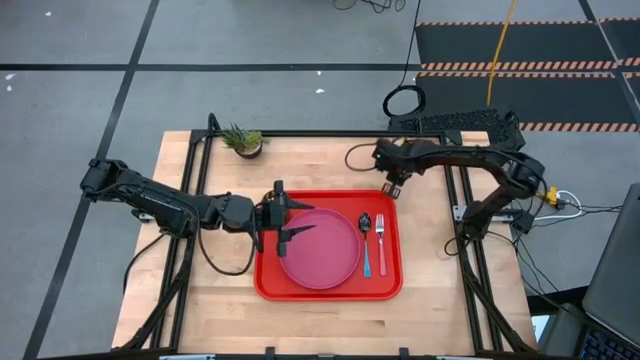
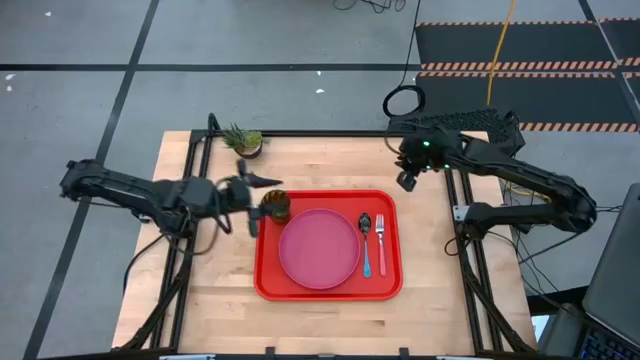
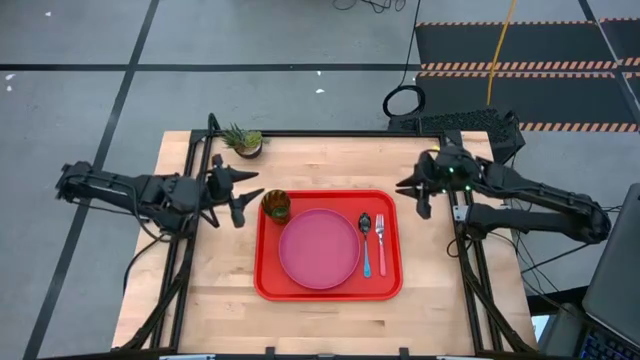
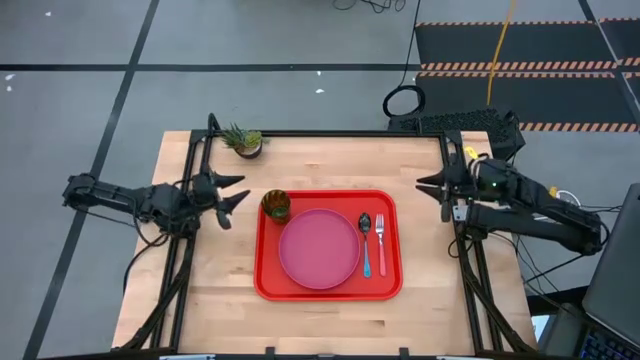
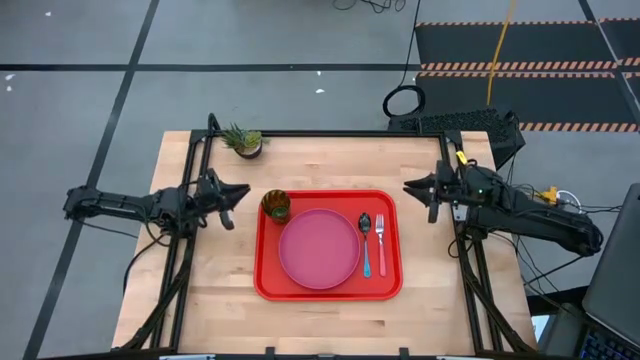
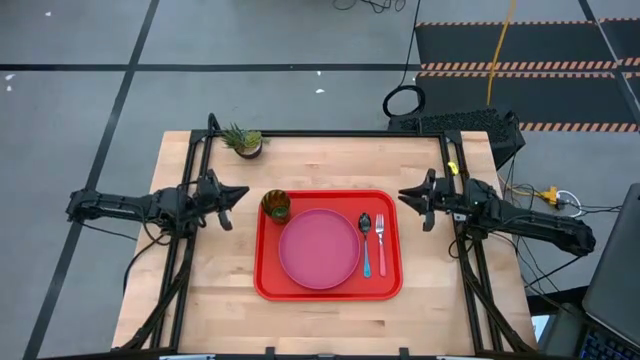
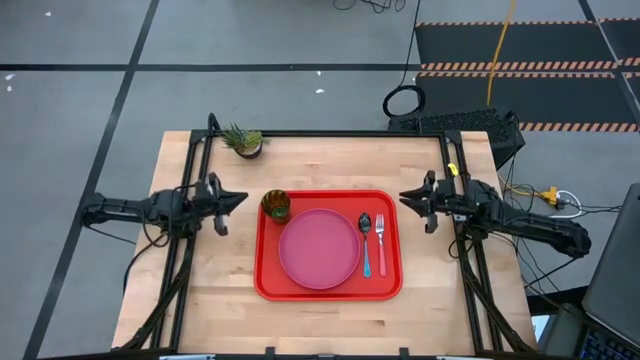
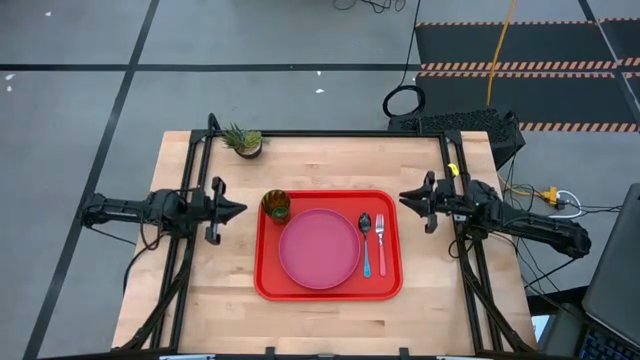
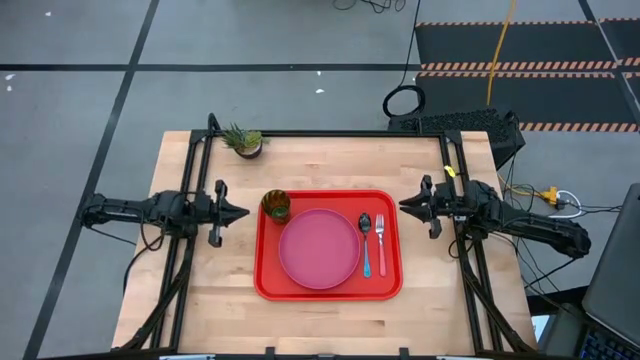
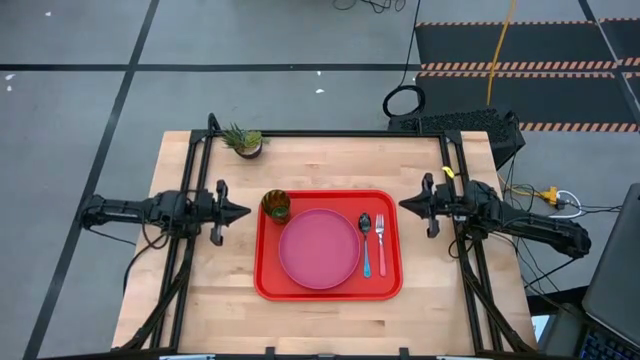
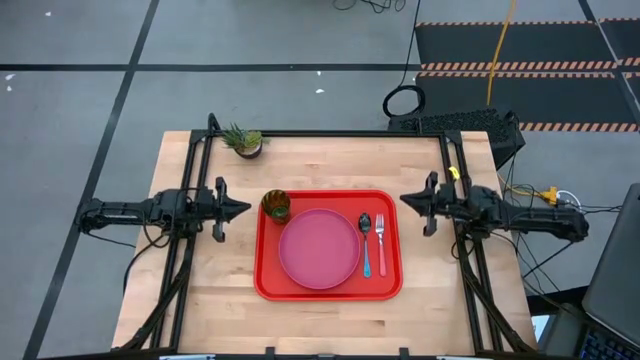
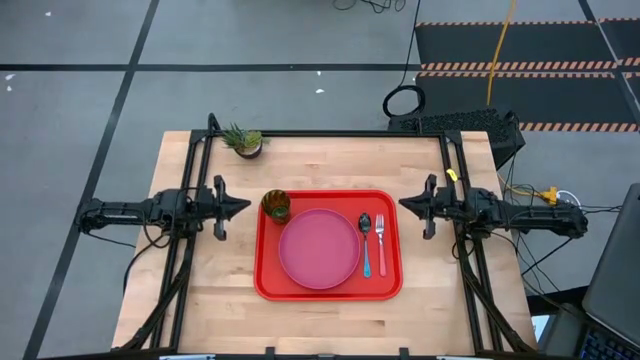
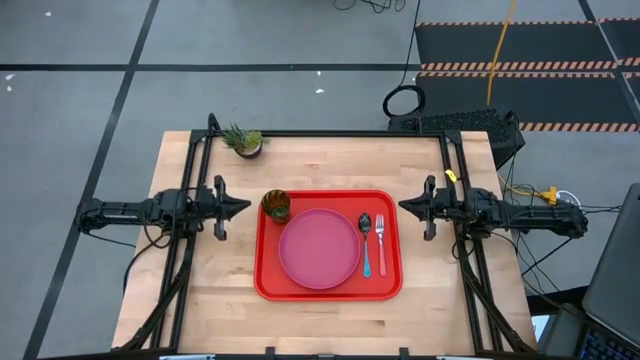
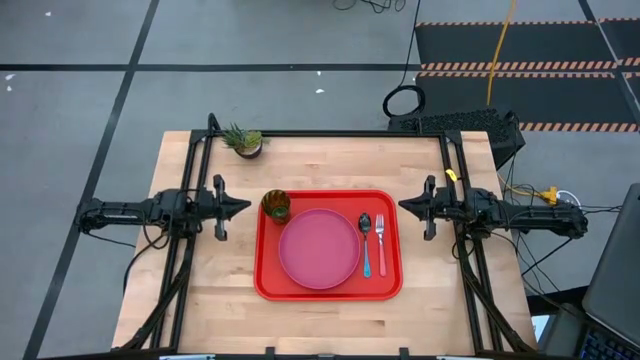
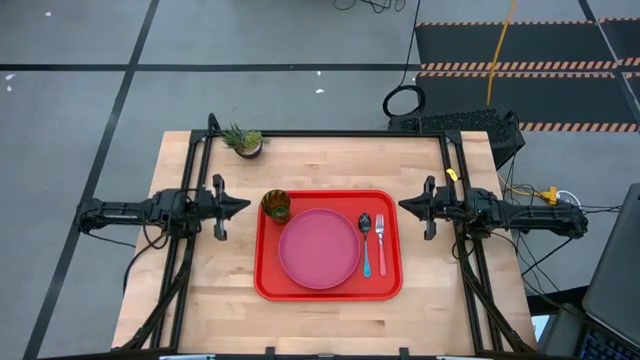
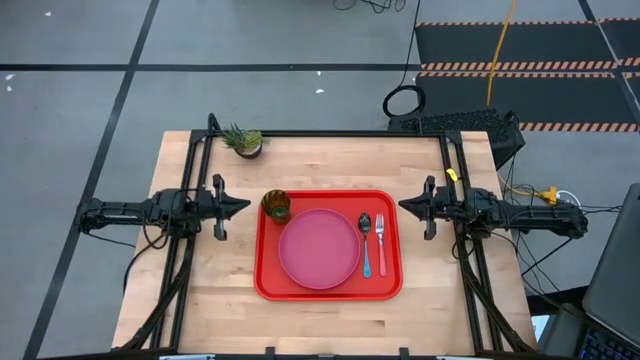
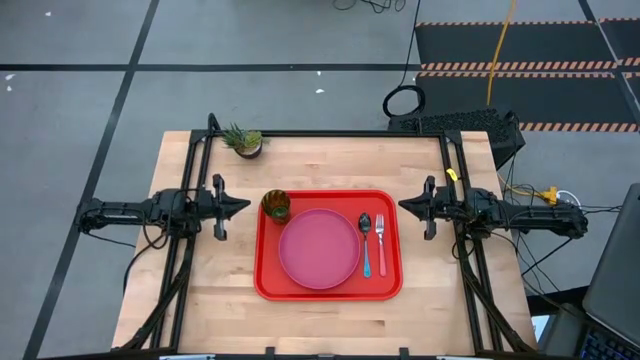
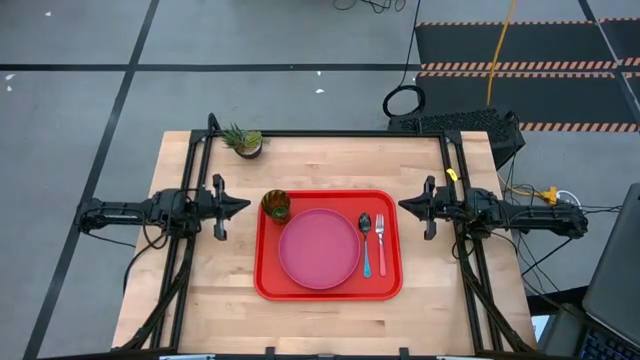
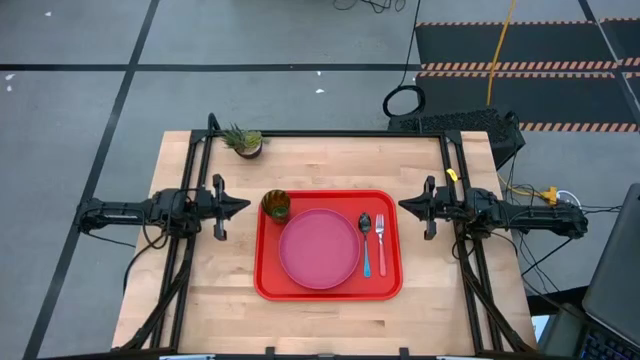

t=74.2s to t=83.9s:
Task: Pick and place plate/cup/fork/spoon on tray
Return to Home Position

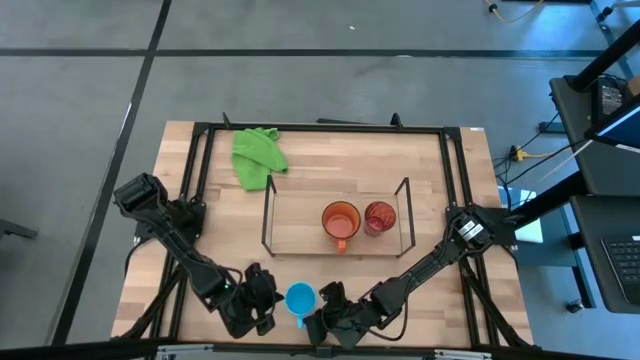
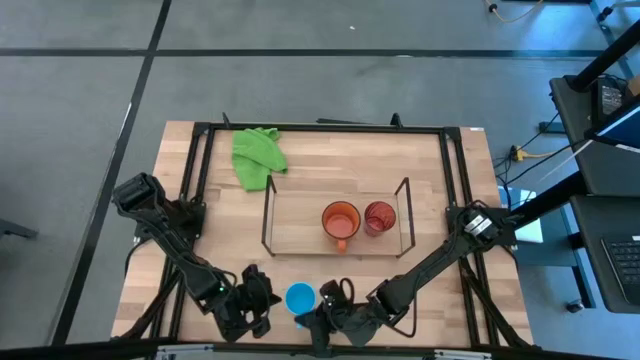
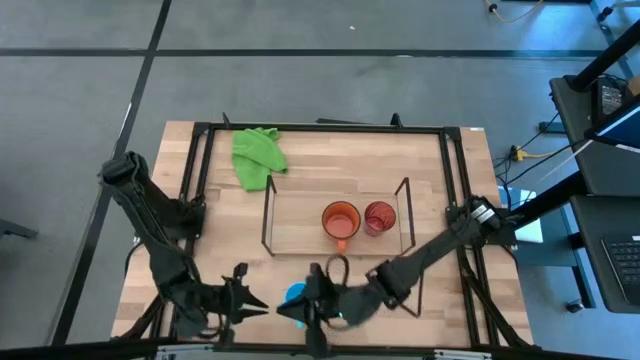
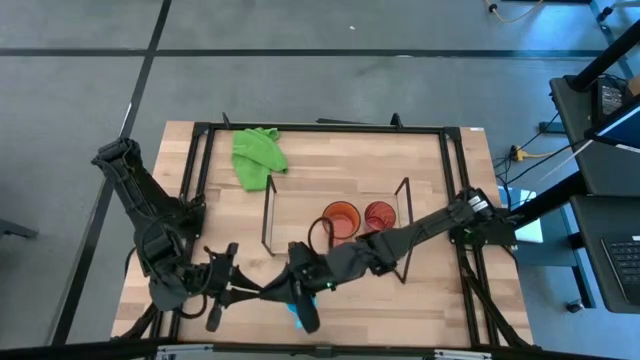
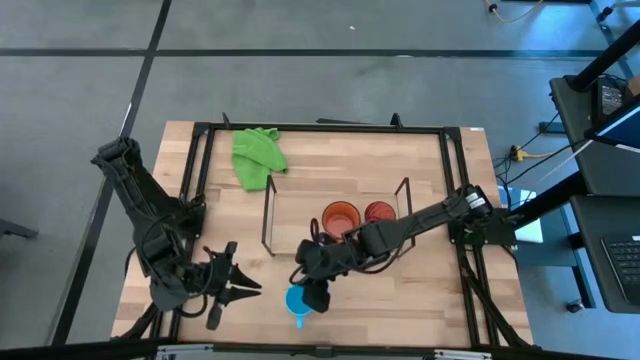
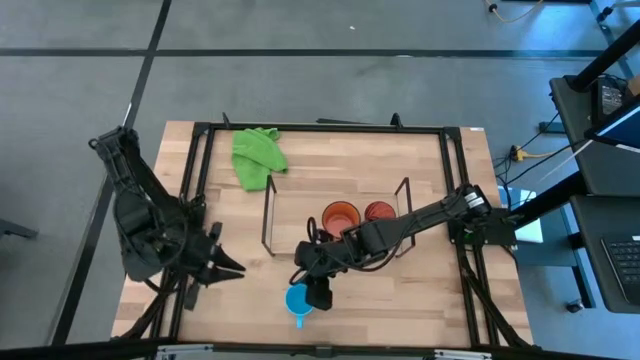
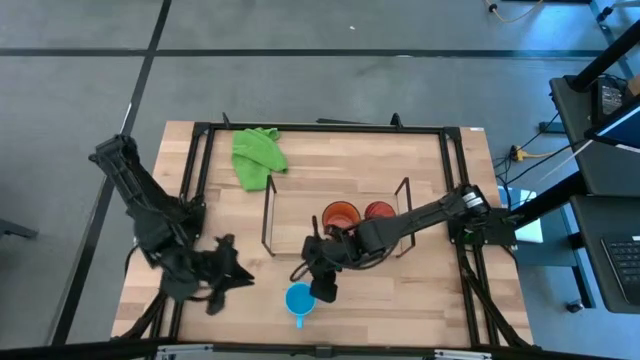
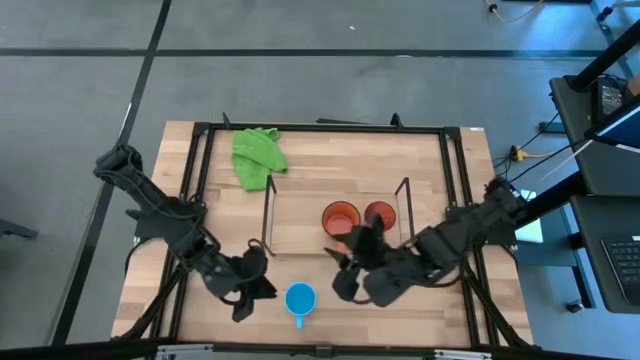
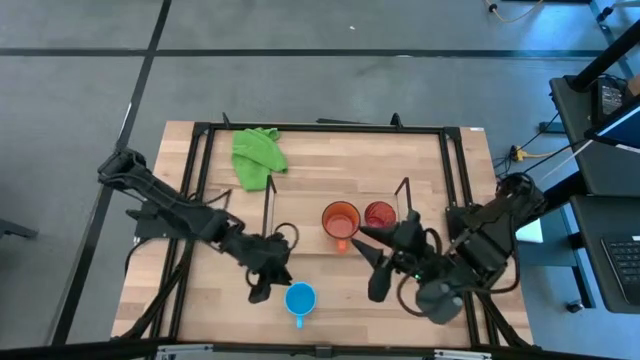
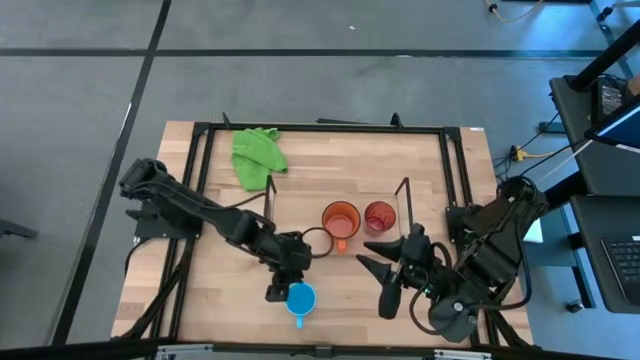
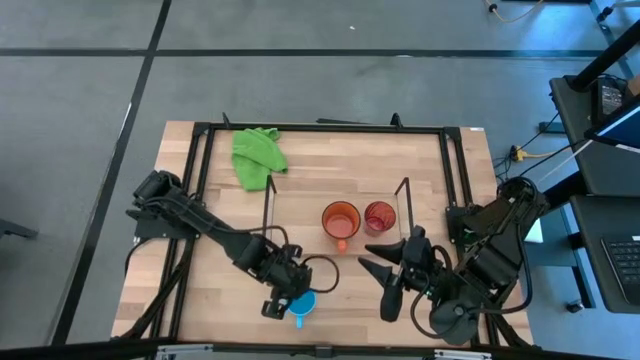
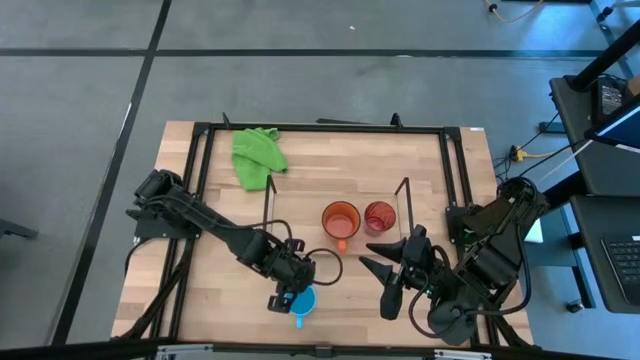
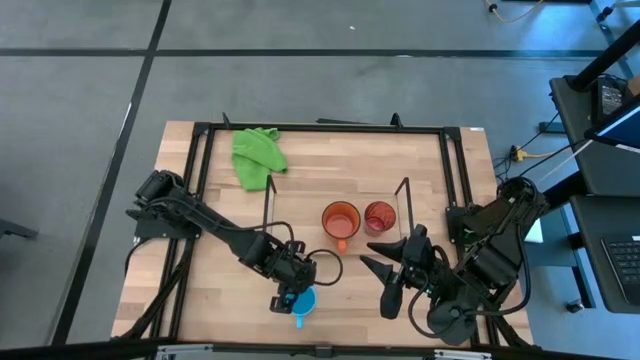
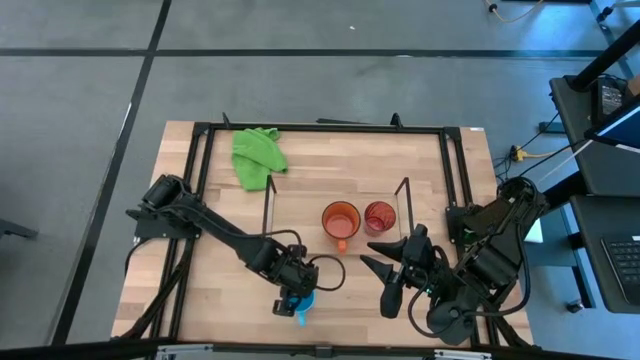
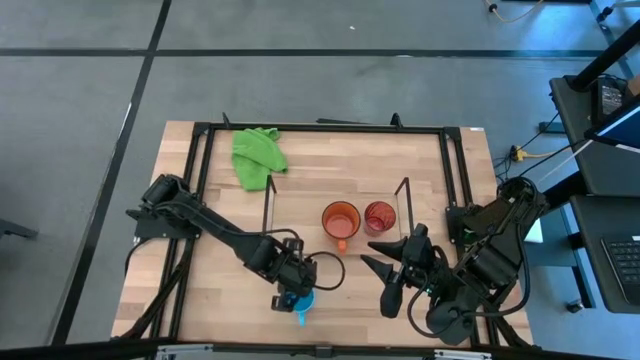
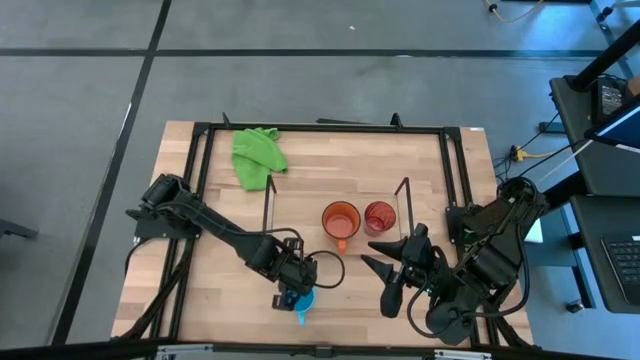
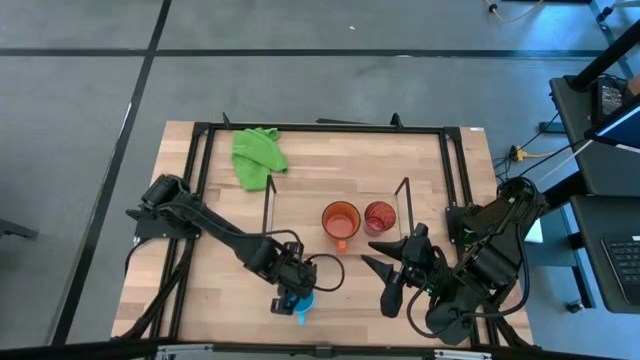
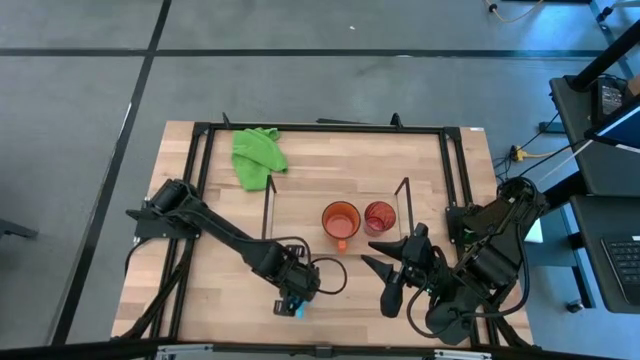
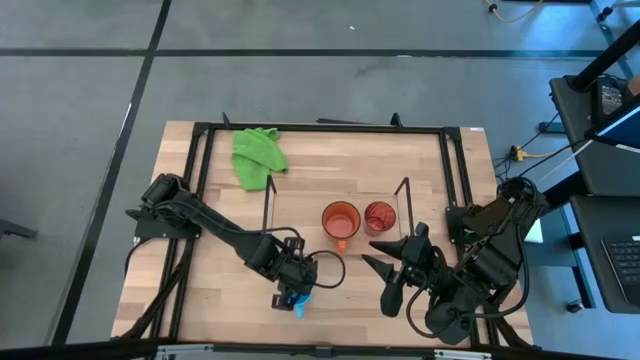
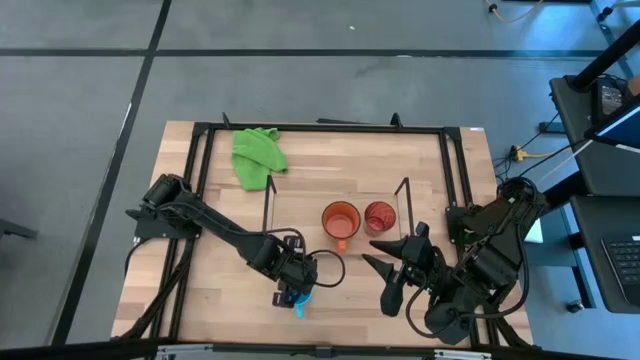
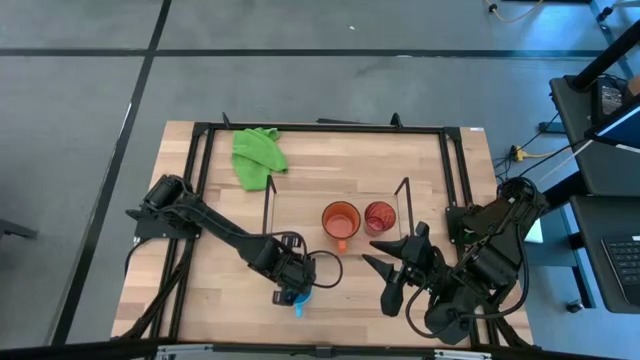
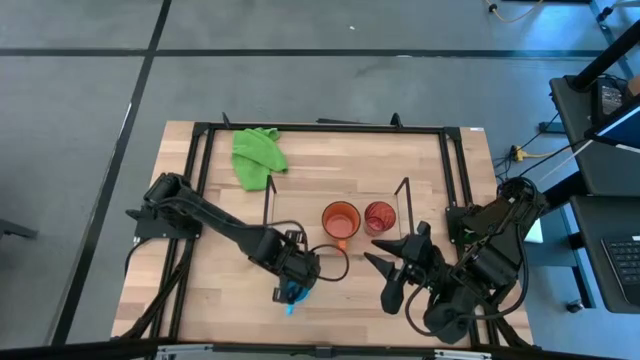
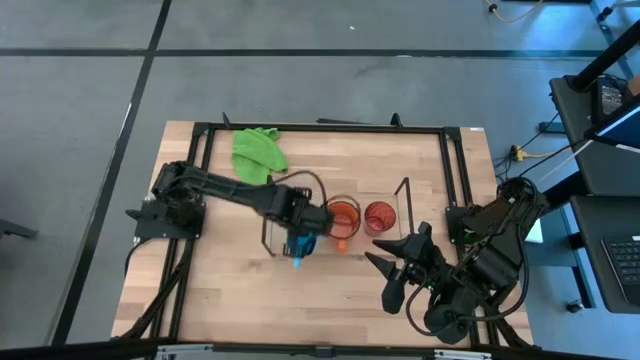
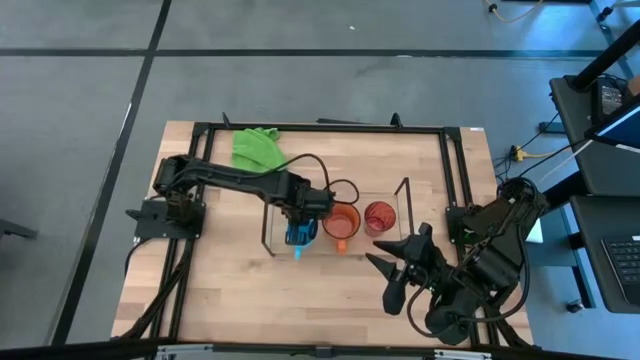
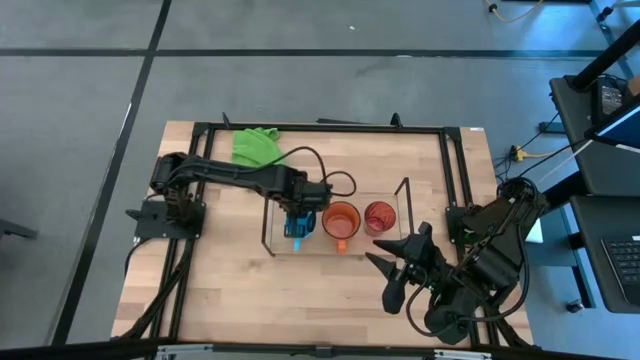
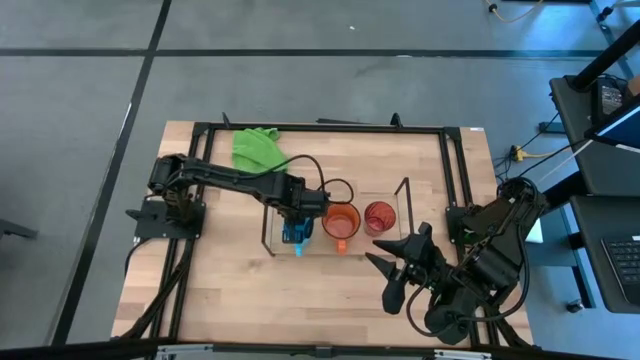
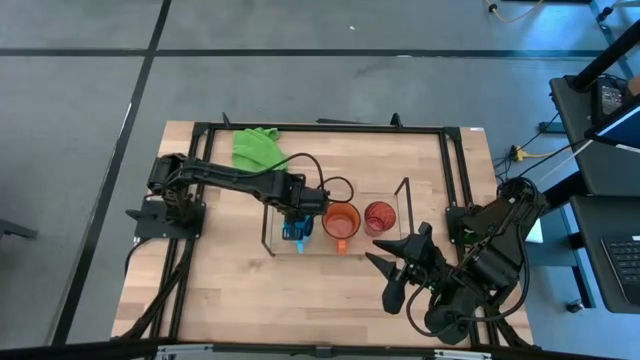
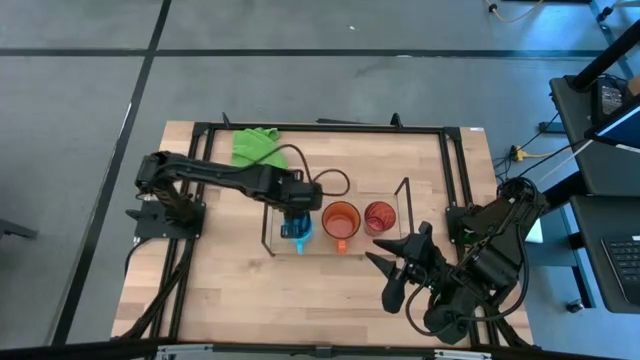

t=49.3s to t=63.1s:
Task: Stack small to large cups/mugs on shelf
Put the blue mug on the shelf
